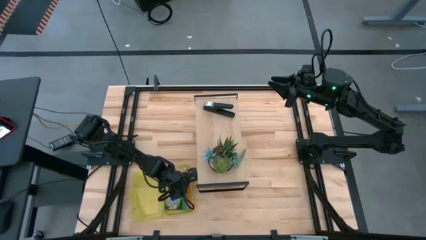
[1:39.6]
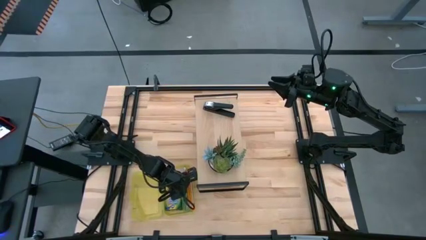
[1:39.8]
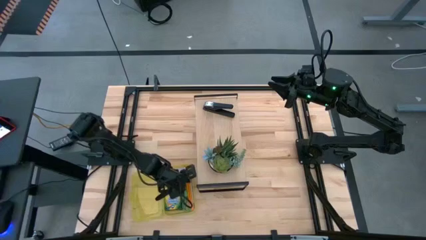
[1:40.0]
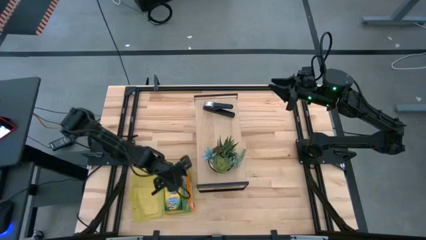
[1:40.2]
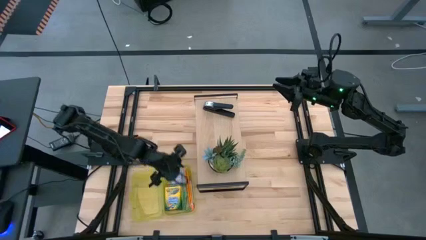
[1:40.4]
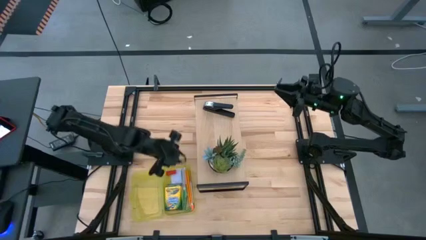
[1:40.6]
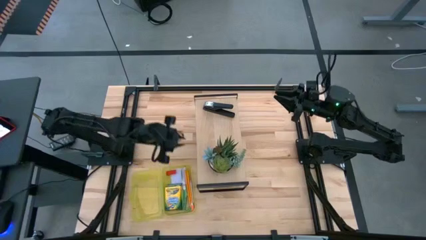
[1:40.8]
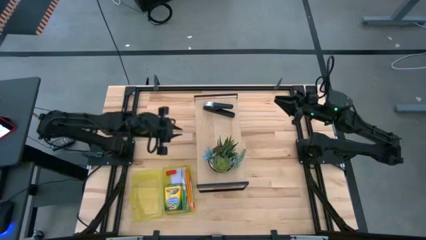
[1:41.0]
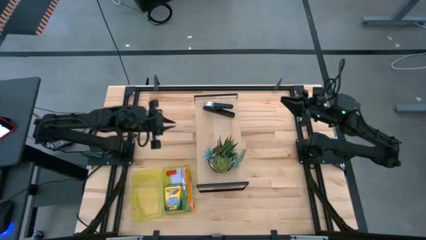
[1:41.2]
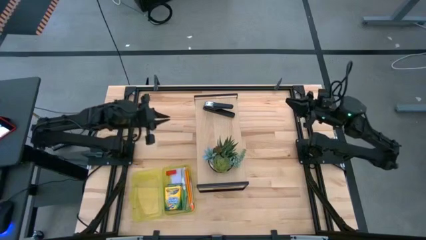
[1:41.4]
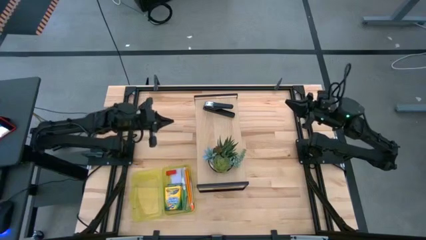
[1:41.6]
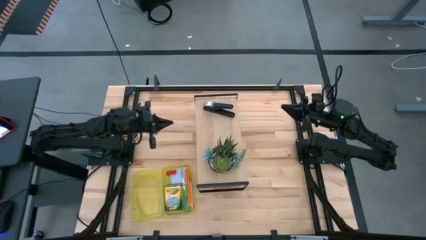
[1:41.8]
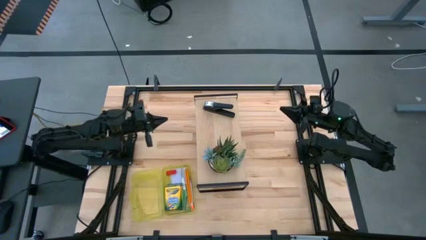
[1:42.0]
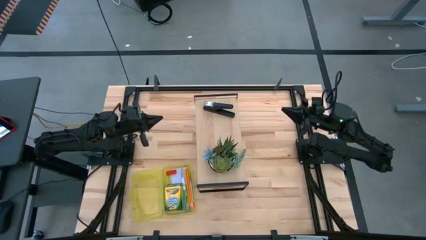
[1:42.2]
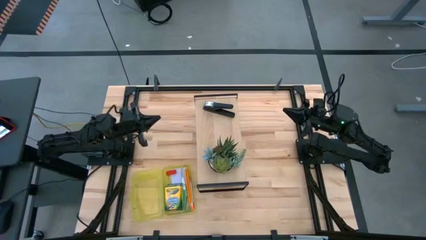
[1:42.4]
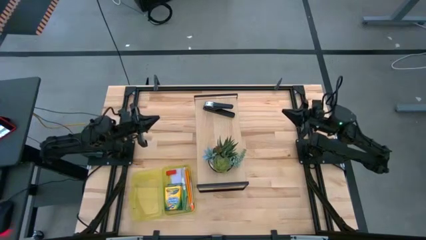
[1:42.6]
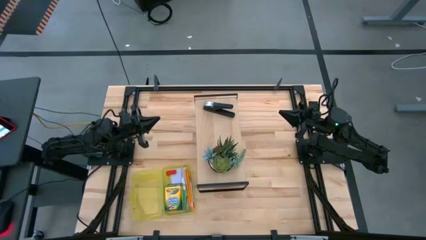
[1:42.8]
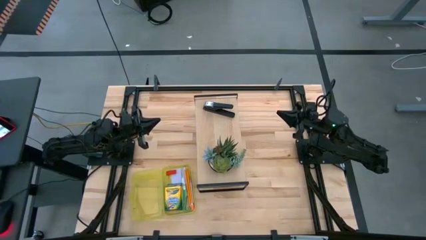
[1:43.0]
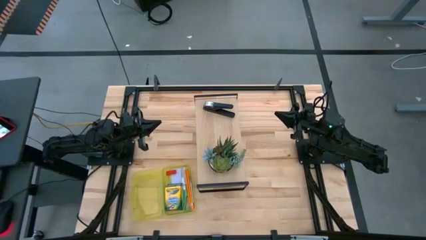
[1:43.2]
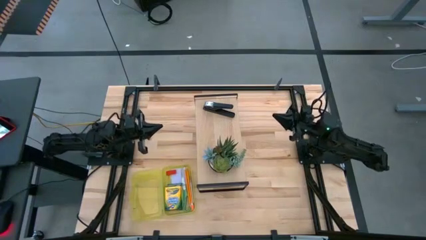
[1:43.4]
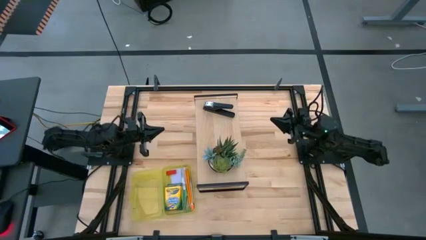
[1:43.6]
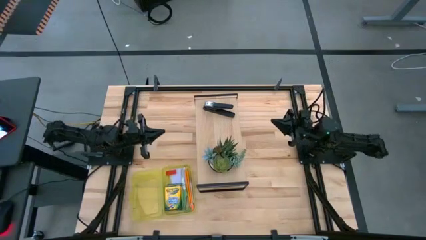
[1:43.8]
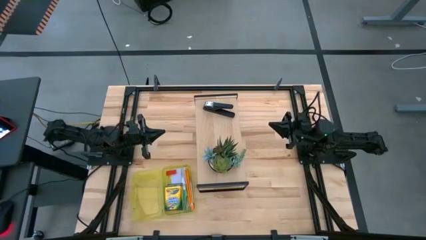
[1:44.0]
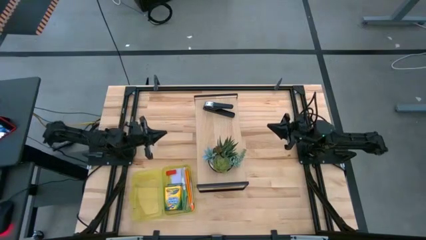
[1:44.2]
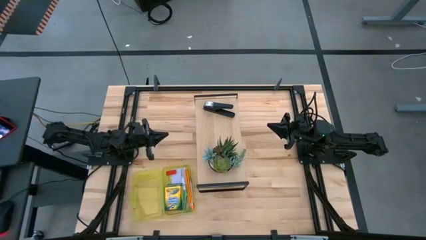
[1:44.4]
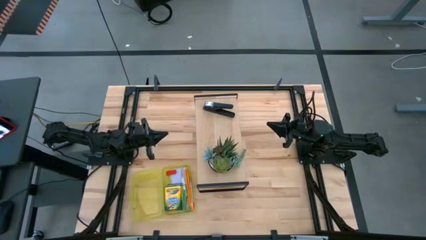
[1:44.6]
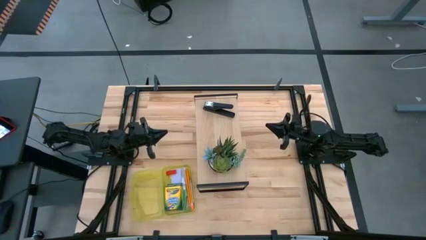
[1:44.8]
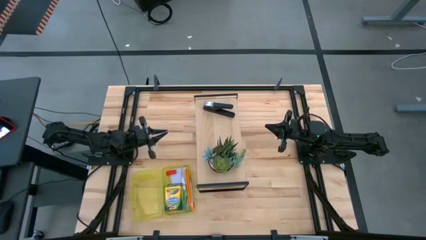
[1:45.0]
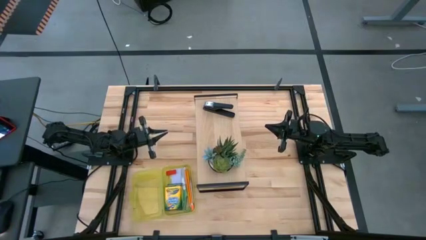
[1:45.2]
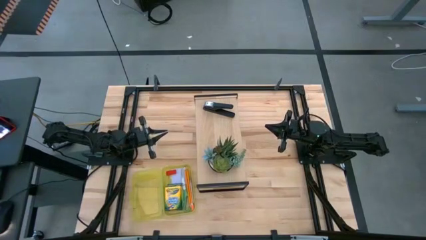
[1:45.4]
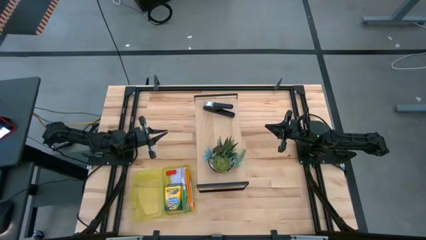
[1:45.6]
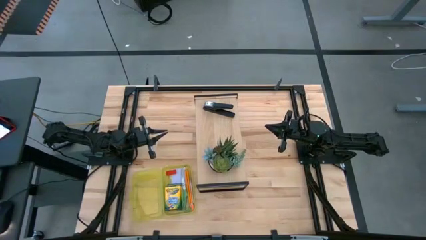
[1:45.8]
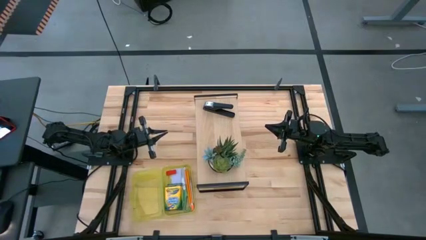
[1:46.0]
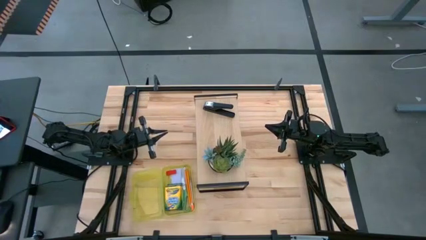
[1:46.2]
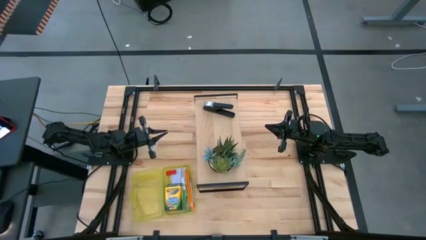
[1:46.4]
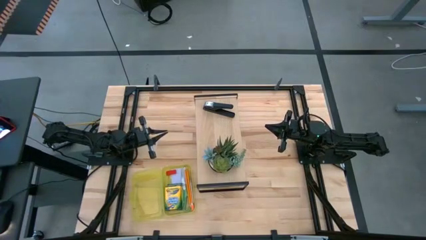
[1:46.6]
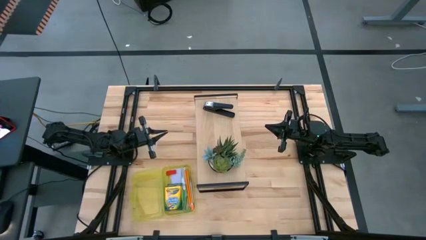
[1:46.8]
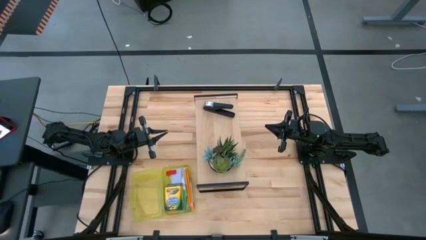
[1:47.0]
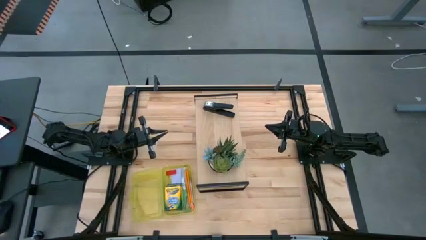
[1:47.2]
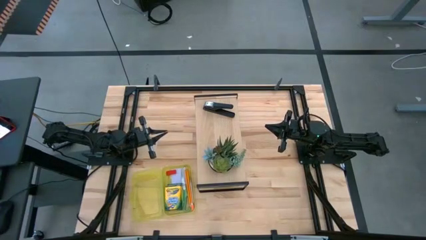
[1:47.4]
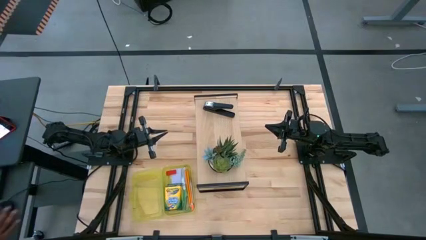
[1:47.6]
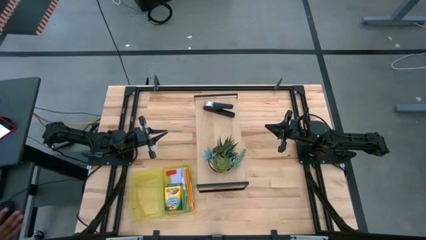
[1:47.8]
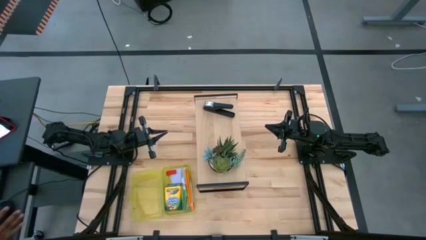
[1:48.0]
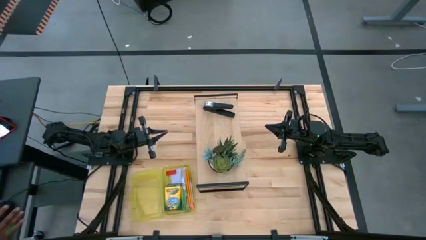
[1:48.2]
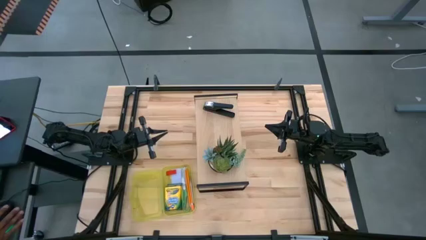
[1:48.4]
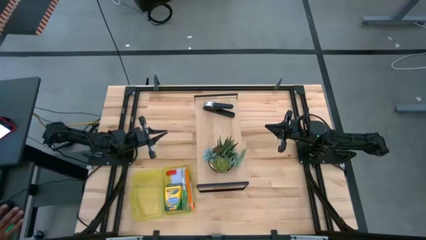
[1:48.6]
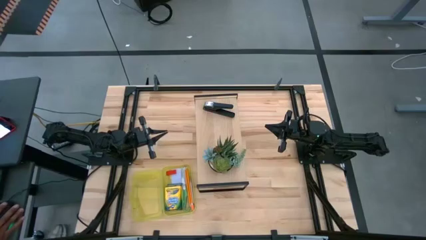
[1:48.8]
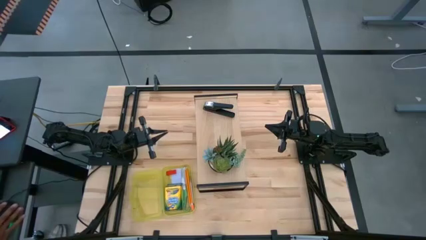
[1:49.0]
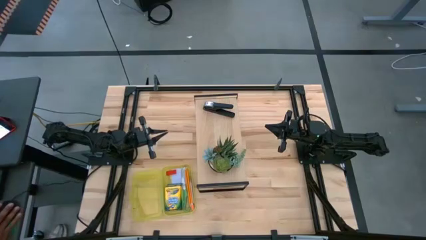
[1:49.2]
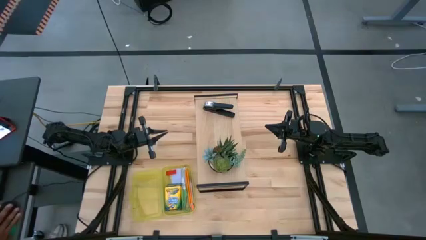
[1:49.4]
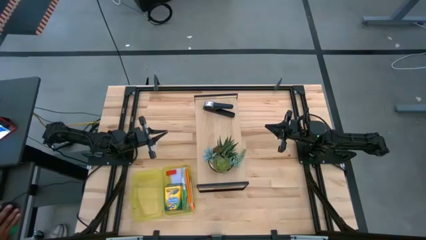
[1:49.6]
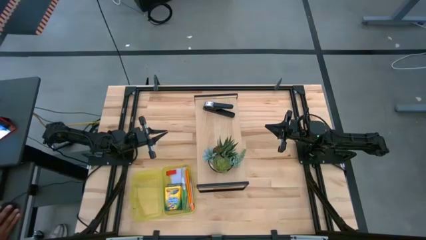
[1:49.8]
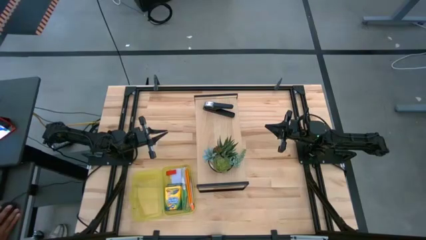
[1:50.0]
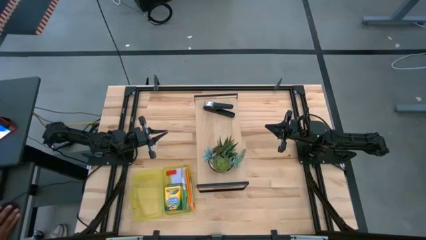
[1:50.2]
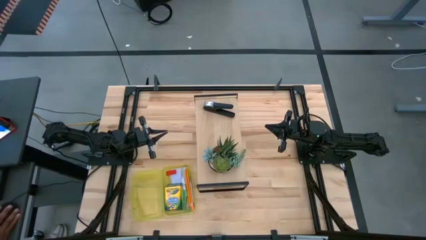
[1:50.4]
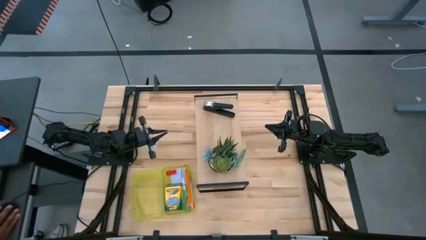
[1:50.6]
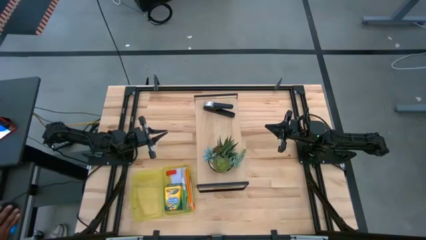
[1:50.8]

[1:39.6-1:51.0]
Task: Pack school essentials
Return to Home Position

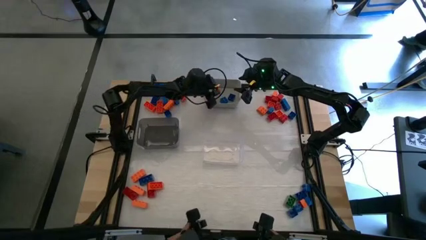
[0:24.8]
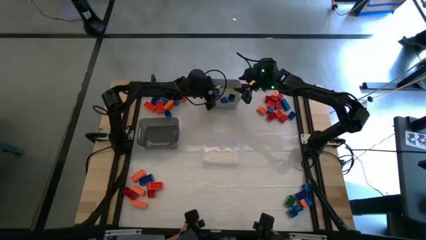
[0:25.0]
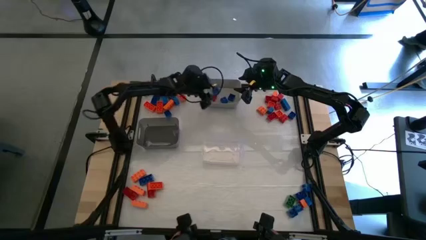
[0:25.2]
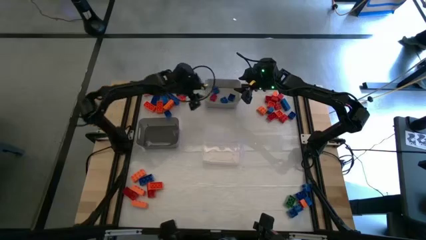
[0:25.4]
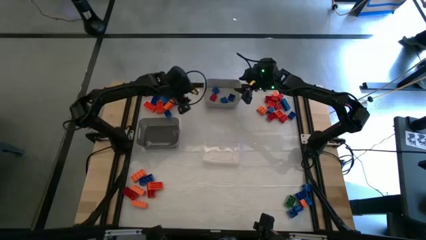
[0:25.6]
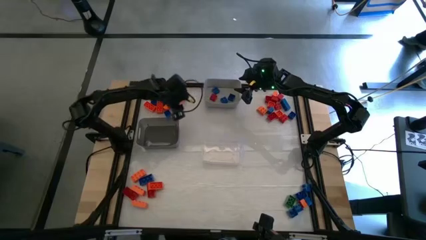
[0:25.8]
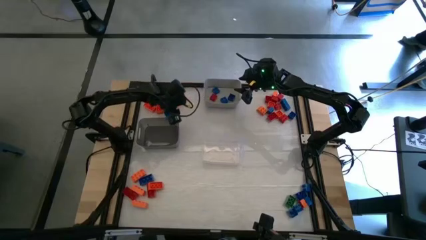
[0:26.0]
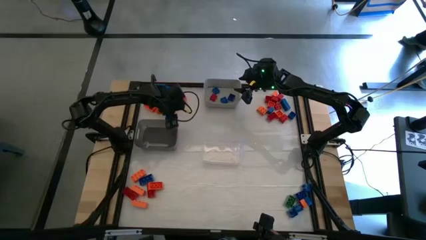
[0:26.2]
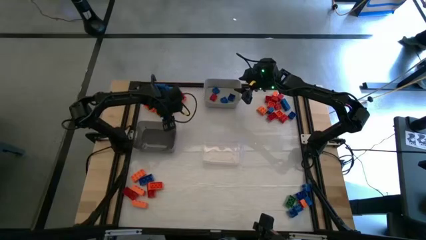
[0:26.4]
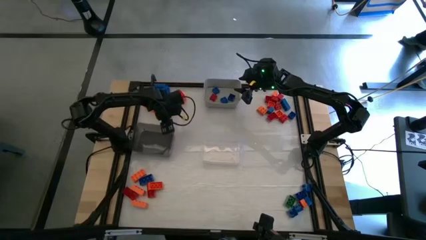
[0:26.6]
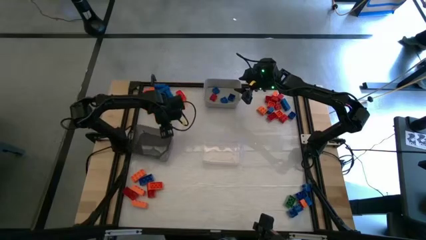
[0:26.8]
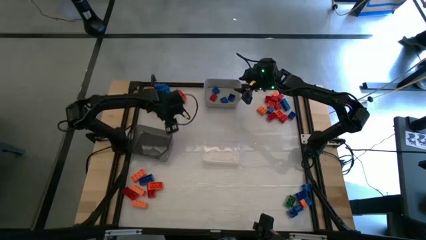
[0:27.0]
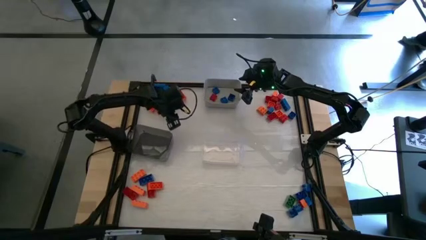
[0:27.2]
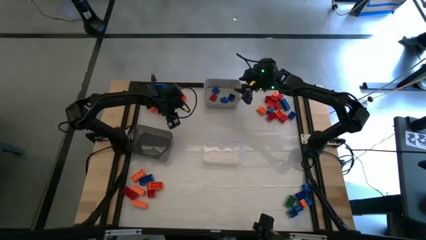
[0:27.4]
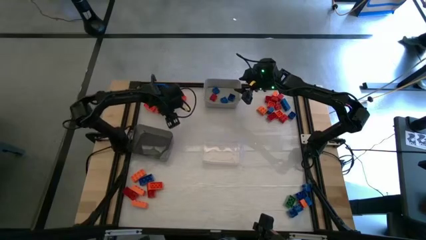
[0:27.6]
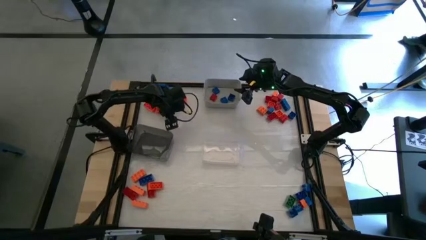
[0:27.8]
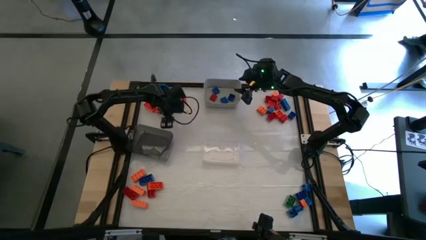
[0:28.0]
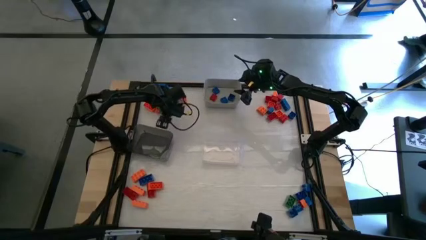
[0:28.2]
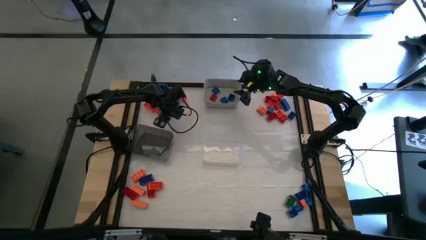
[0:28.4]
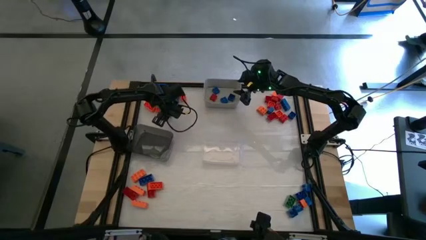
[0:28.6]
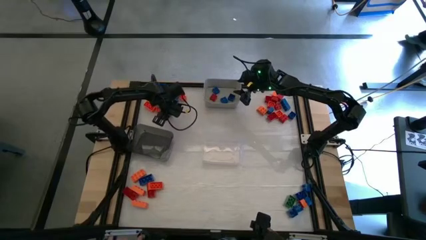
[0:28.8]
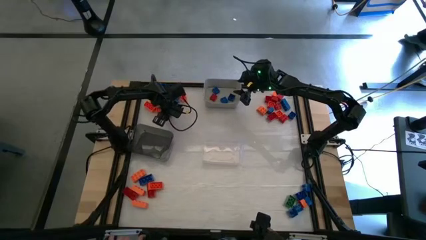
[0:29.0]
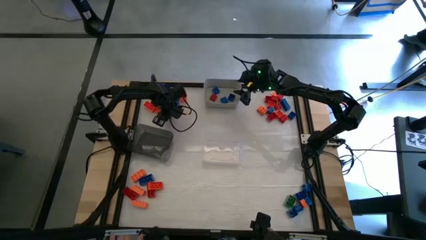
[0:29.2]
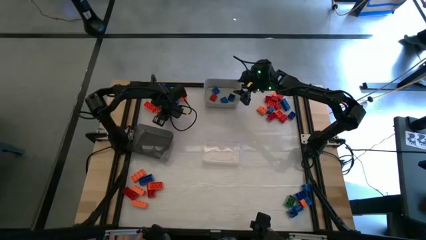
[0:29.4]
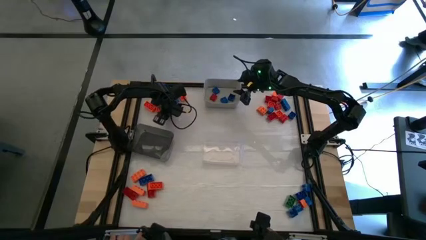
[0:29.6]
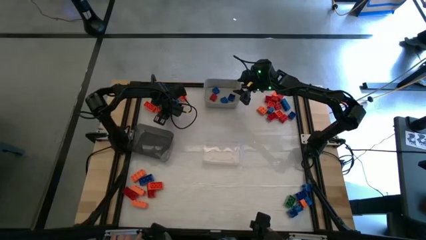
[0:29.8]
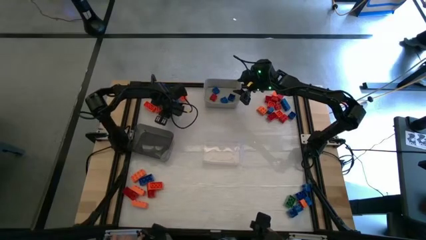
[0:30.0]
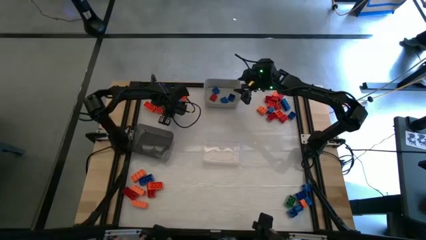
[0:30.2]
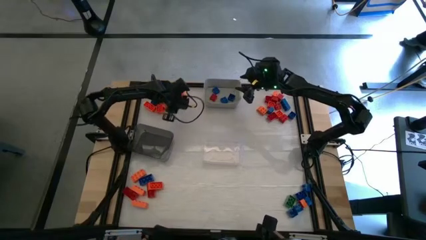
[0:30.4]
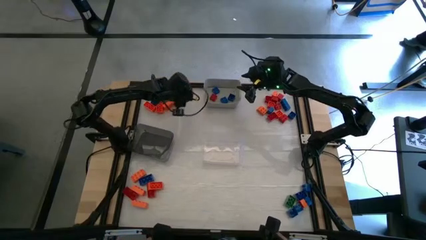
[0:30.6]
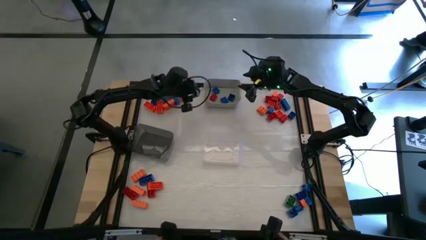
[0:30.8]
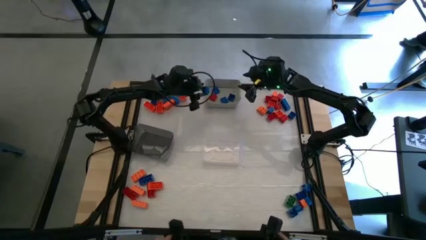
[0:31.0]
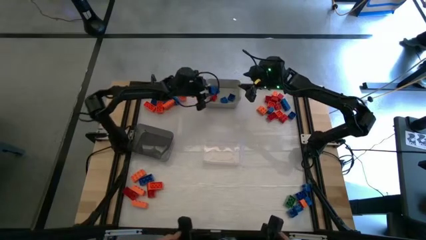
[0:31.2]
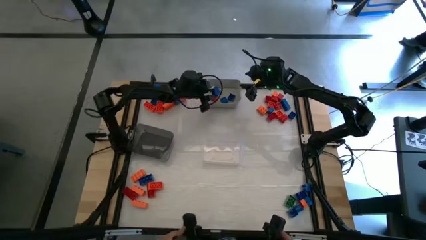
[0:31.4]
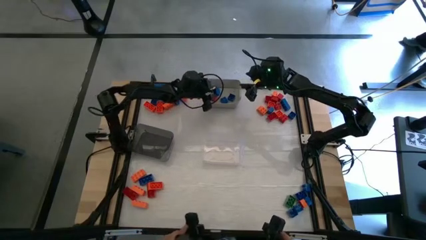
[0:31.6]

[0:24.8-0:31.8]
Task: Sort blocks by size
Put the small blue game piece into the gray bin
